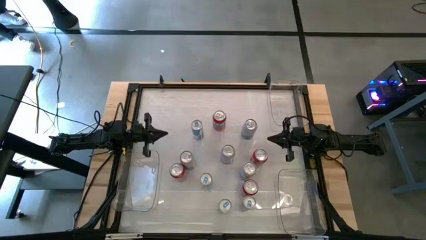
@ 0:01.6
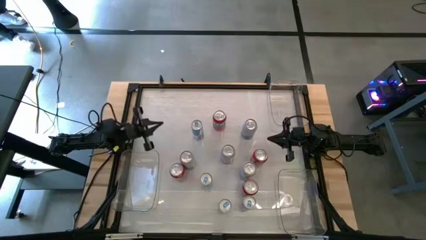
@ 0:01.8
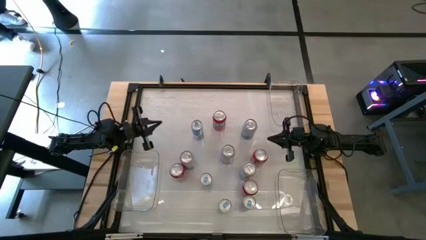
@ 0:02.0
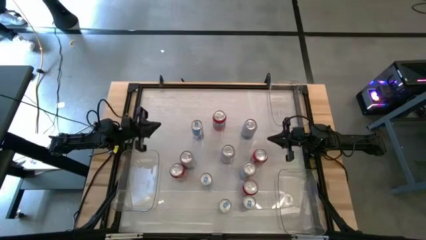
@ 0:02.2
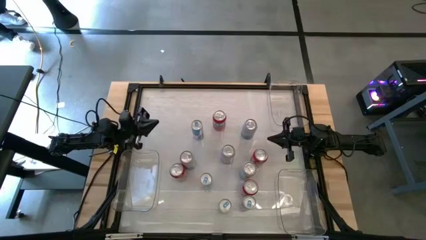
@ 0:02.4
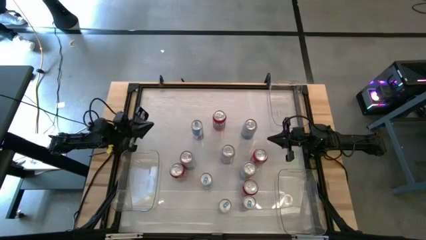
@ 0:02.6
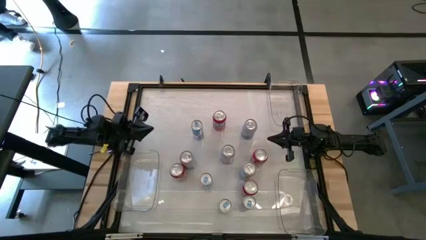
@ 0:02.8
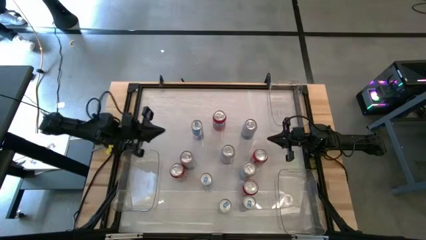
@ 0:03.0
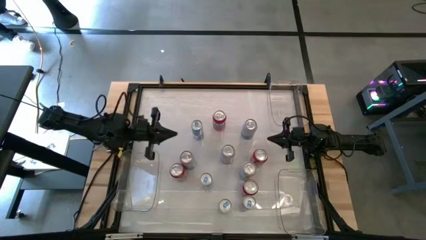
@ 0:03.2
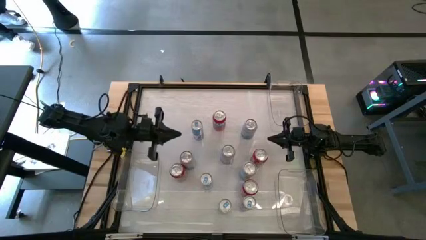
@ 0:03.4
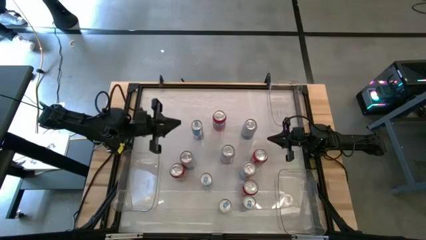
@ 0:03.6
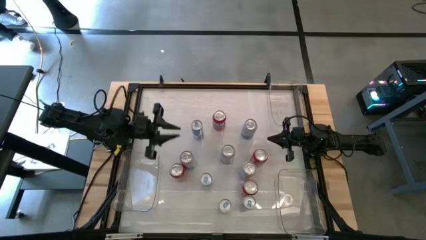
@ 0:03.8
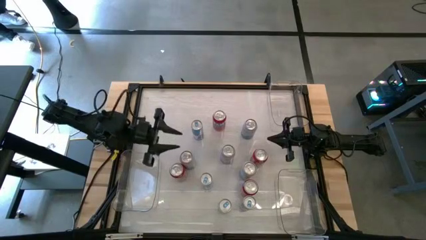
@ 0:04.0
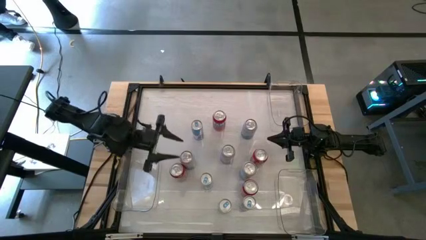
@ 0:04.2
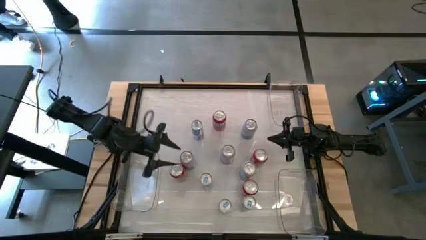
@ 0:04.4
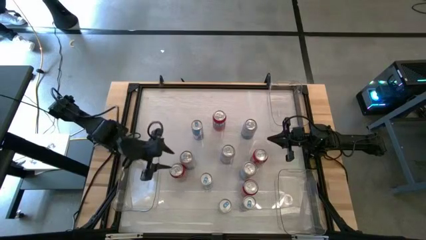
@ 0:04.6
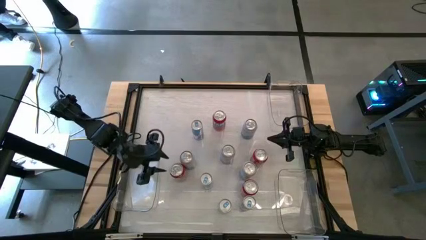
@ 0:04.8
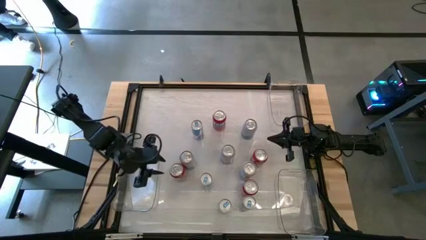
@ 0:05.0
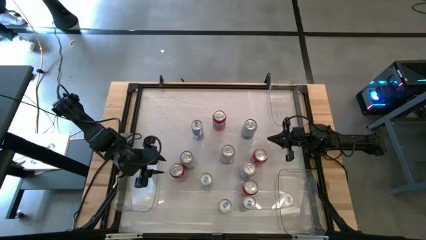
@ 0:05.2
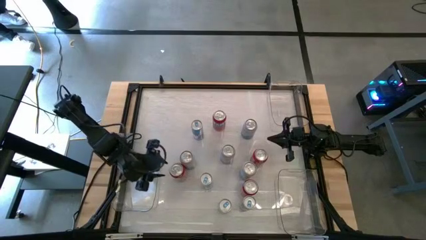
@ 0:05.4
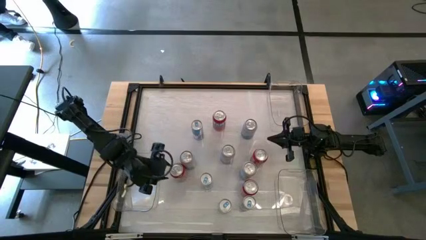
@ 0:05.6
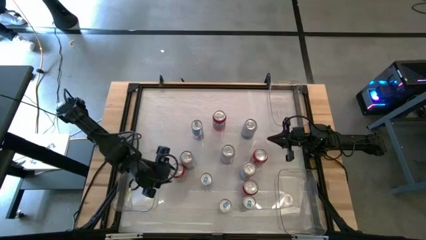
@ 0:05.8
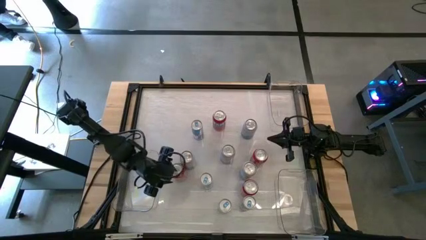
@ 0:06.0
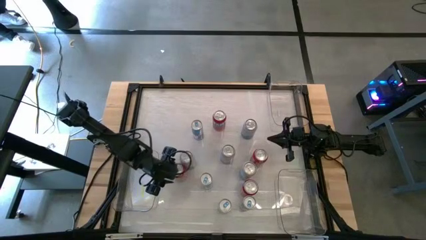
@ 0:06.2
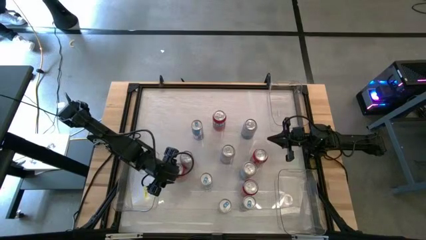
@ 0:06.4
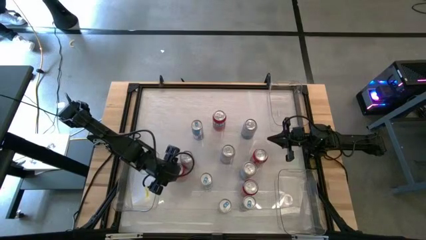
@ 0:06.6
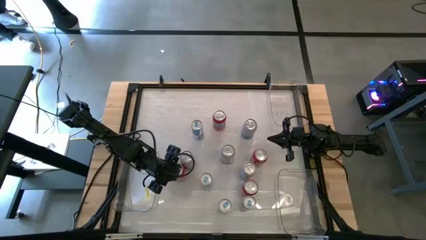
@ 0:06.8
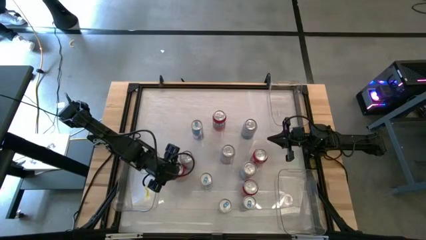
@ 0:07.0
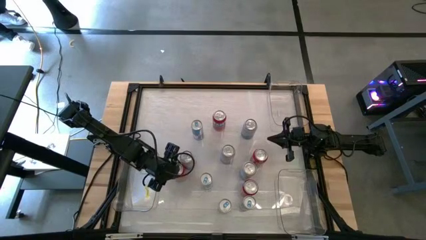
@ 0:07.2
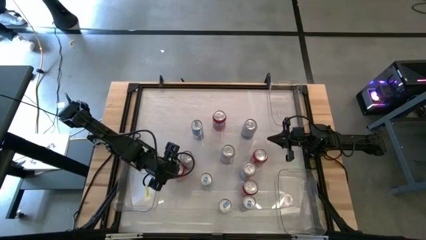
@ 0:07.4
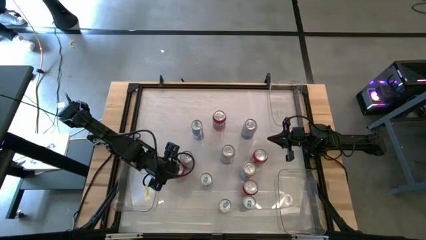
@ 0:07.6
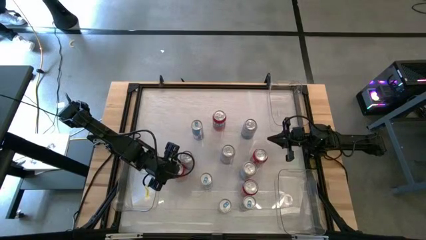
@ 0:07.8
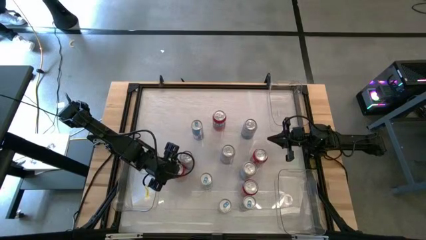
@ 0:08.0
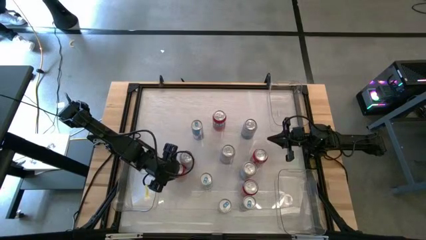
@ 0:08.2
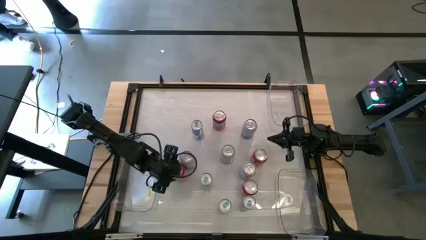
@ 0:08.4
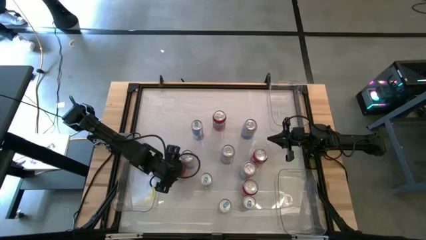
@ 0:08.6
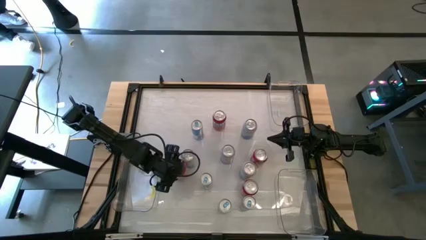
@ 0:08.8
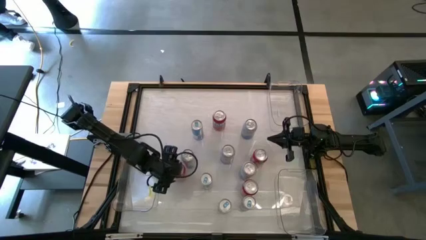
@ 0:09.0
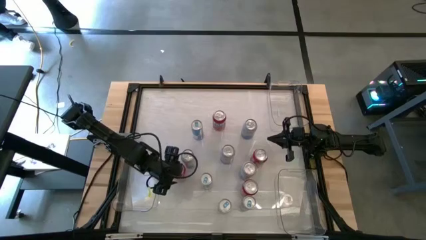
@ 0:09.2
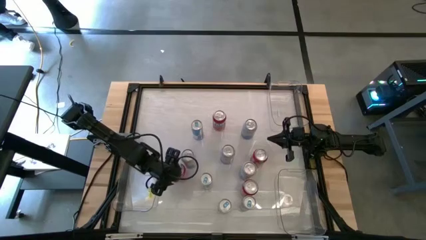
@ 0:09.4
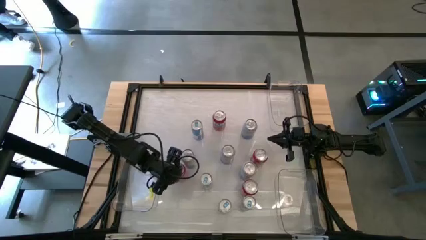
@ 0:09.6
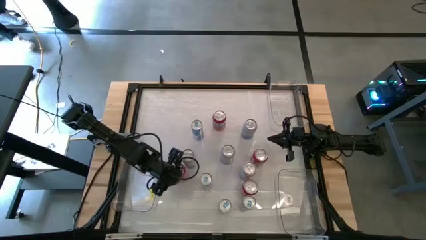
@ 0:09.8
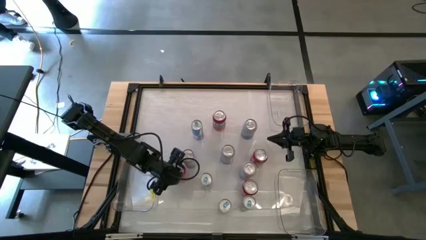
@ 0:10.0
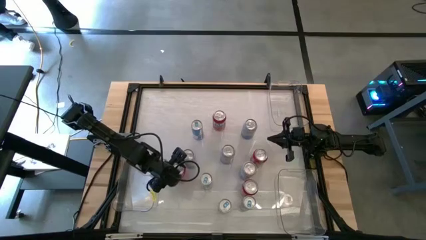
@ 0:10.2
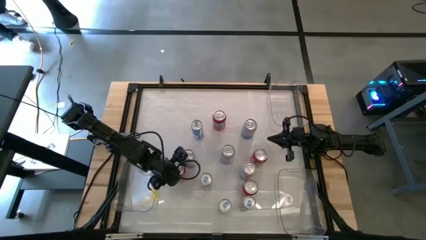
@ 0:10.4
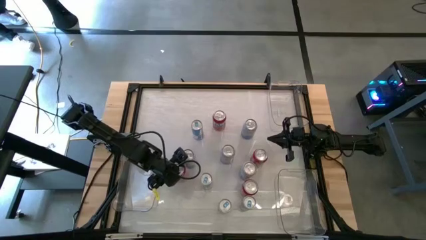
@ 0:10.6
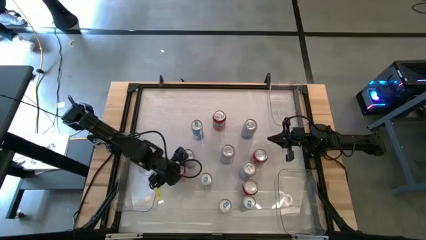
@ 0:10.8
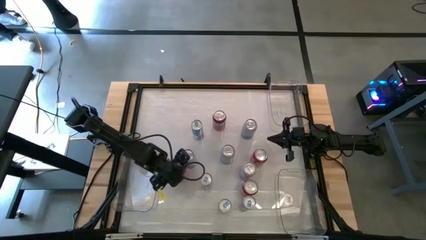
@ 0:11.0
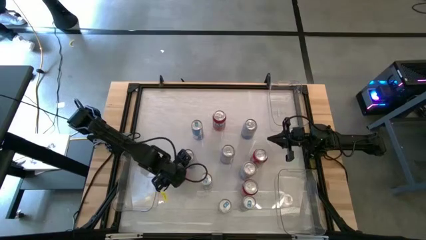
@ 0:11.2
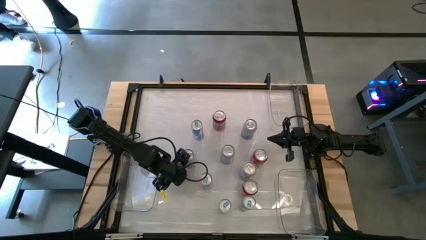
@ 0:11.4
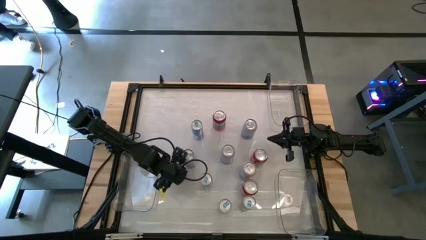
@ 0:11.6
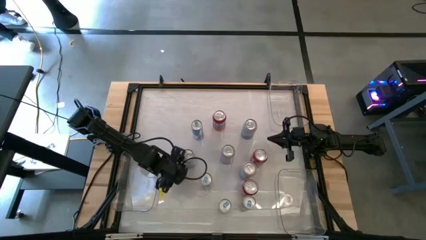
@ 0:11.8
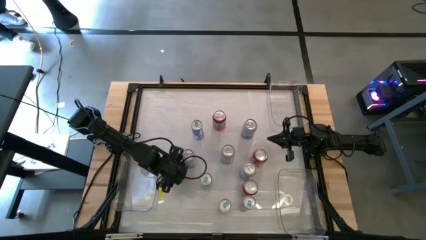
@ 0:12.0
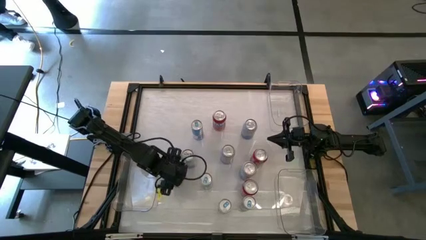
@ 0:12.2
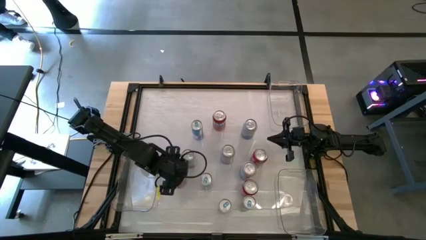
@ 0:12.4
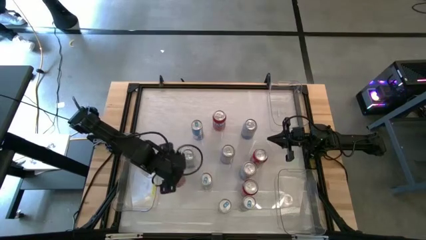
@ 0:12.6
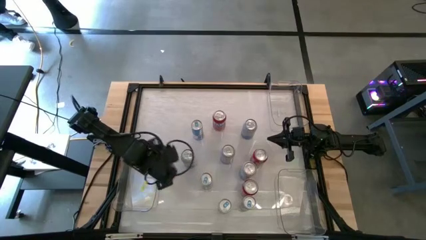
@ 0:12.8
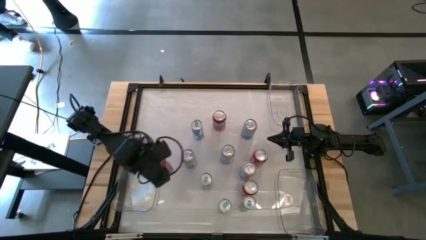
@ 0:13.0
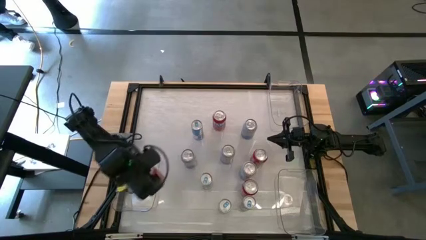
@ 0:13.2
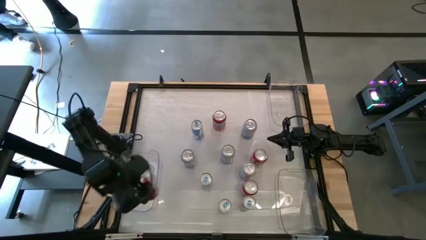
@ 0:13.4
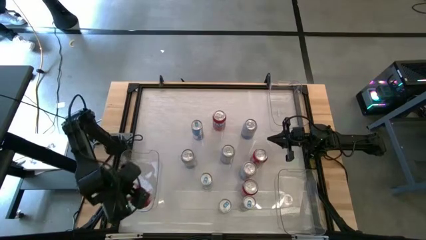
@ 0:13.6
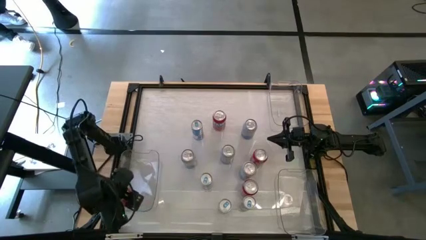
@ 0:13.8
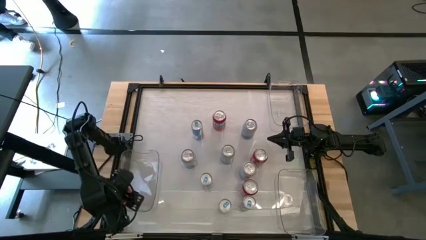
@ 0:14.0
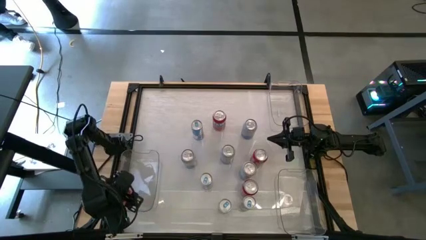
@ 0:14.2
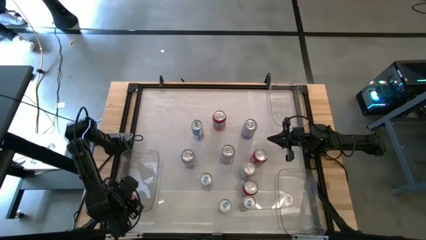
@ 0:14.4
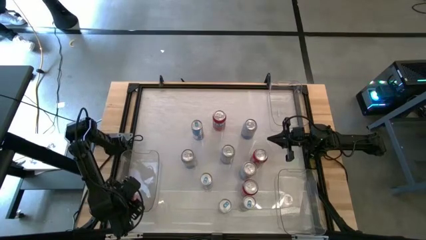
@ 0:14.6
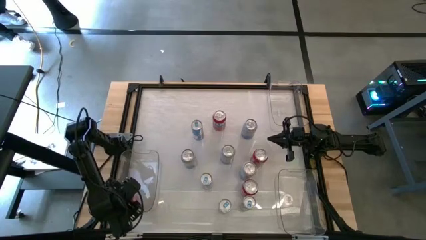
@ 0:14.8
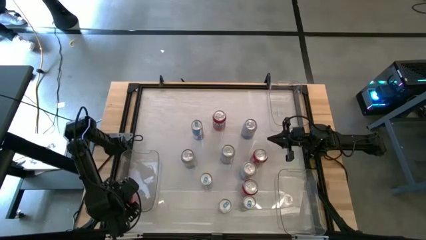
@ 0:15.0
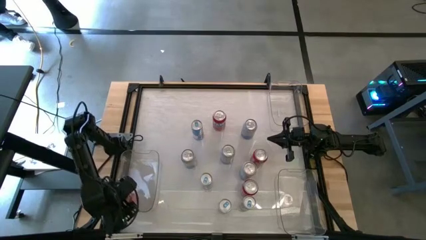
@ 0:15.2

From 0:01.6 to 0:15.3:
Task: Sort soda cans
Put the bottom left red soda can into the bottom left transparent bin

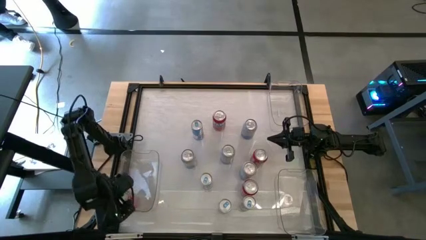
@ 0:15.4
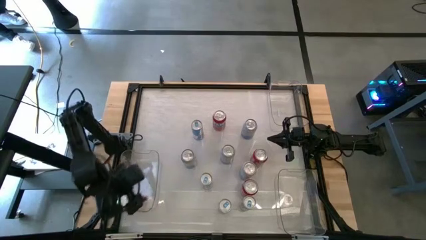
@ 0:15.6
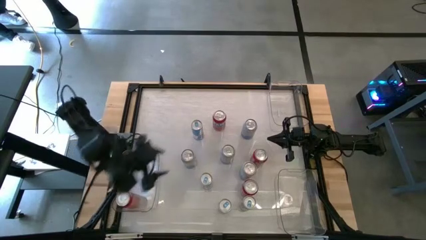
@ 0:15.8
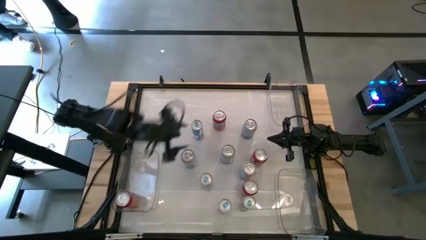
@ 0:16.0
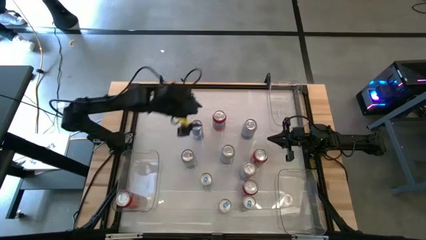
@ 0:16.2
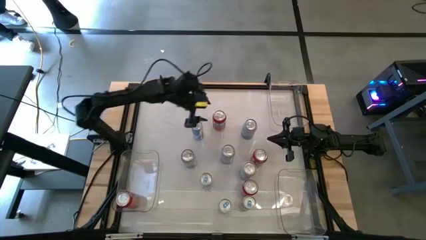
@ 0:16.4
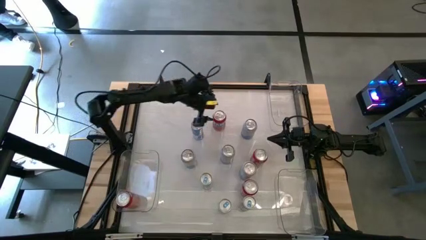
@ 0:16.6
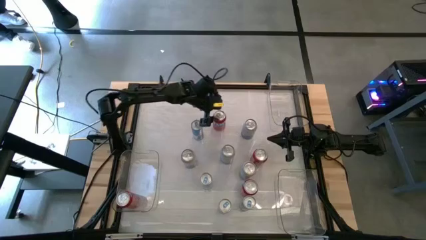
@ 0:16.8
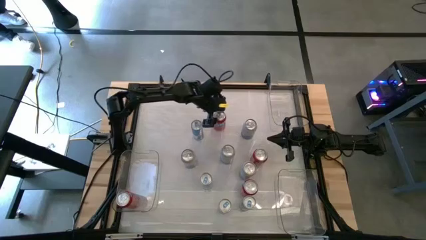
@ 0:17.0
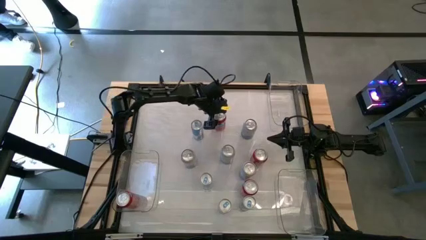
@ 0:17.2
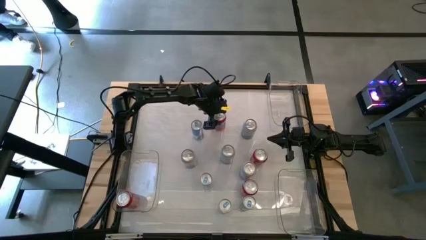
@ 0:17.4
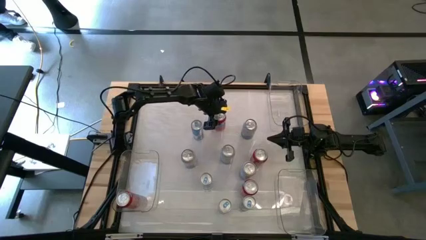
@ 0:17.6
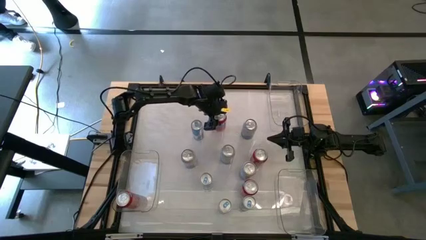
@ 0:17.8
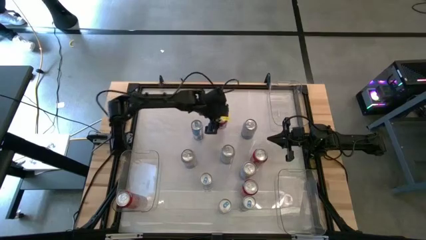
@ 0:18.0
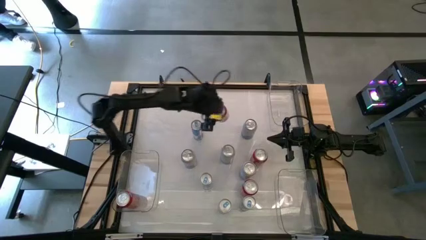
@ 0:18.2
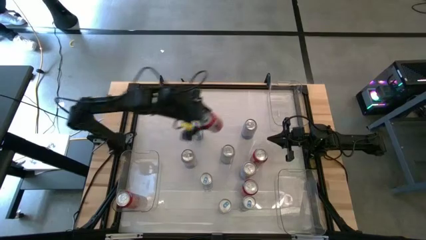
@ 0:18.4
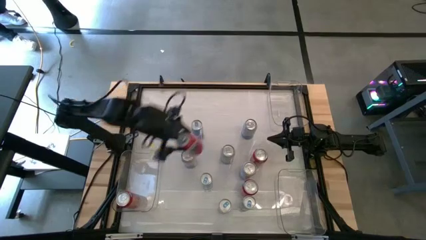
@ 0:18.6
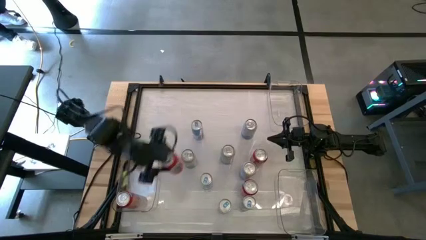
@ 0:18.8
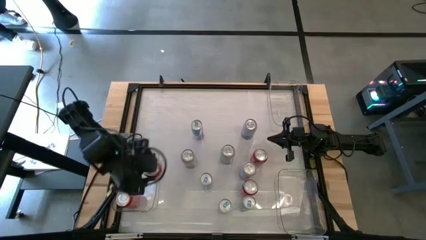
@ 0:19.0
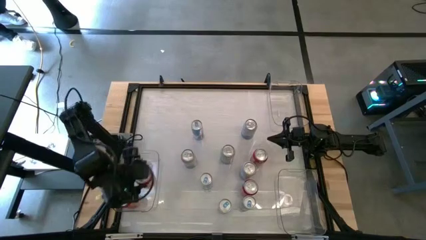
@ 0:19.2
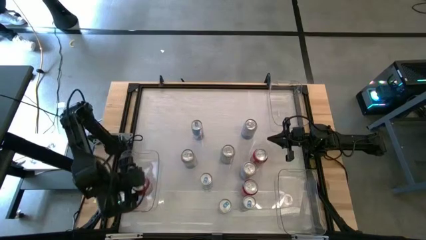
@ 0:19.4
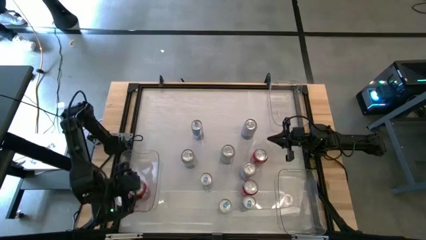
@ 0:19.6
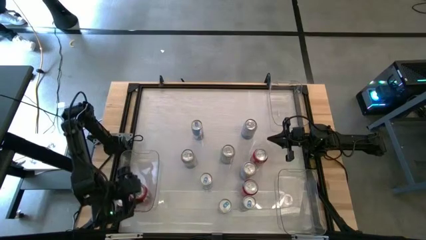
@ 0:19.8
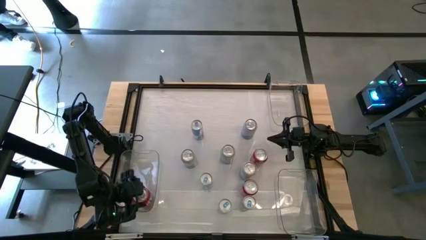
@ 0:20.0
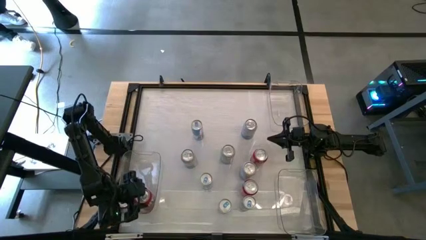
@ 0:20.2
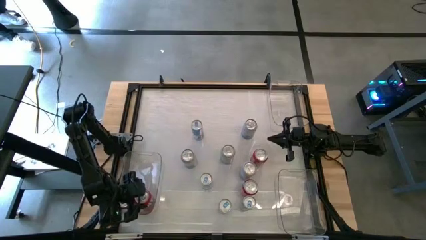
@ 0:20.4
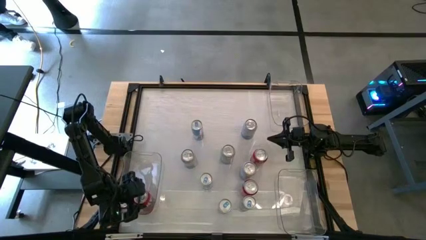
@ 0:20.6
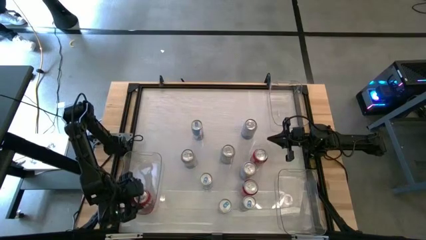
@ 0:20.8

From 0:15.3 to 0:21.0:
Put the top center red soda can into the bottom left transparent bin
